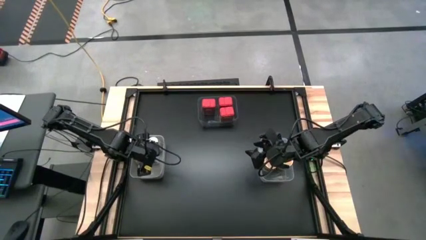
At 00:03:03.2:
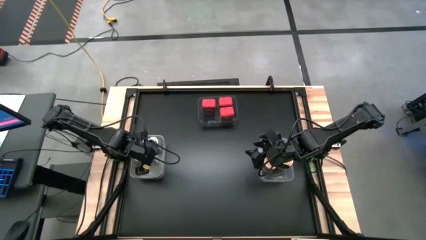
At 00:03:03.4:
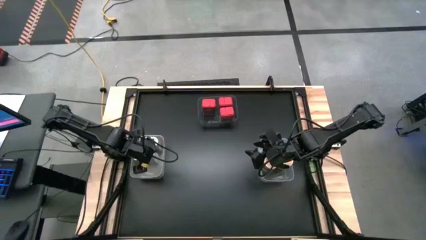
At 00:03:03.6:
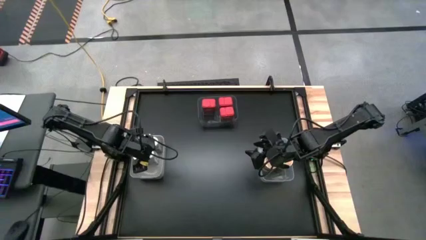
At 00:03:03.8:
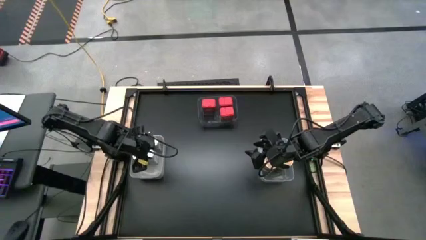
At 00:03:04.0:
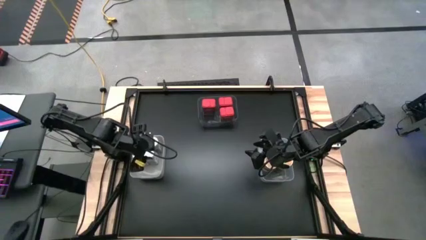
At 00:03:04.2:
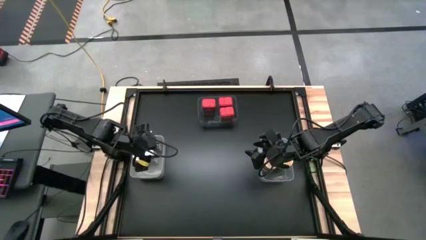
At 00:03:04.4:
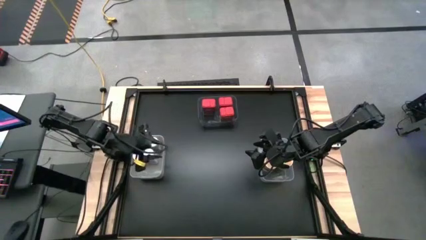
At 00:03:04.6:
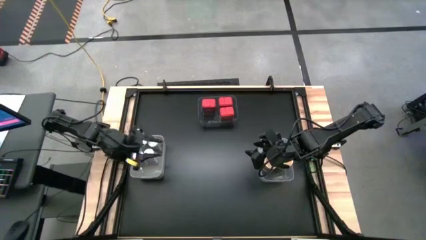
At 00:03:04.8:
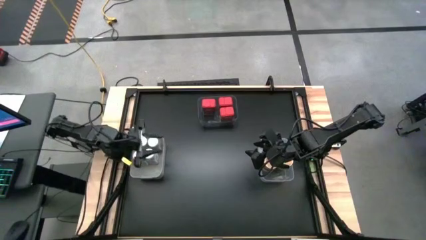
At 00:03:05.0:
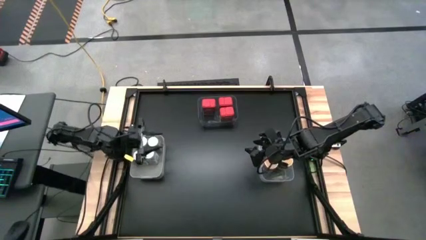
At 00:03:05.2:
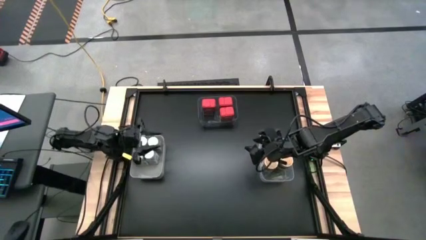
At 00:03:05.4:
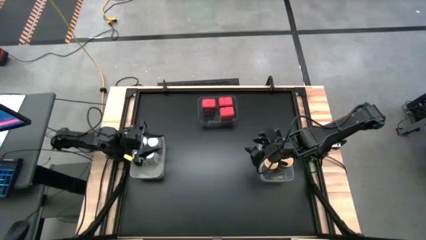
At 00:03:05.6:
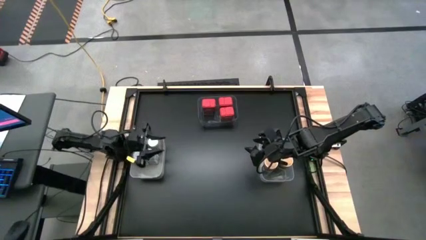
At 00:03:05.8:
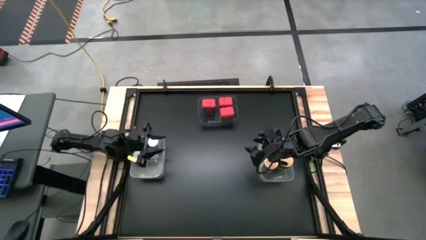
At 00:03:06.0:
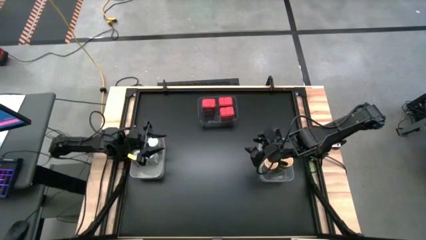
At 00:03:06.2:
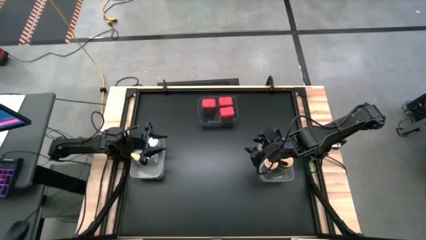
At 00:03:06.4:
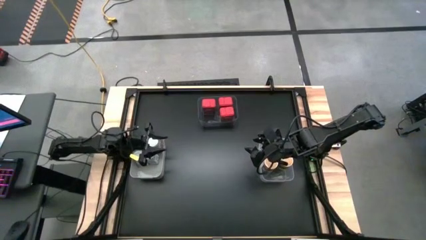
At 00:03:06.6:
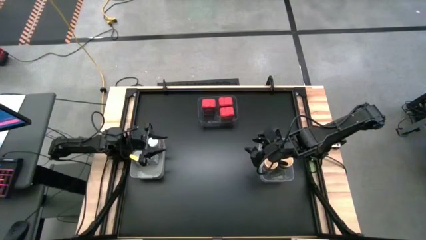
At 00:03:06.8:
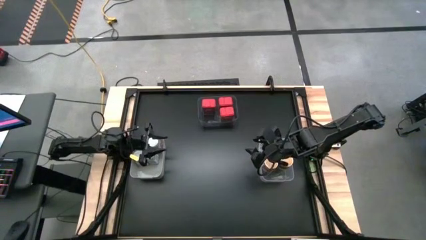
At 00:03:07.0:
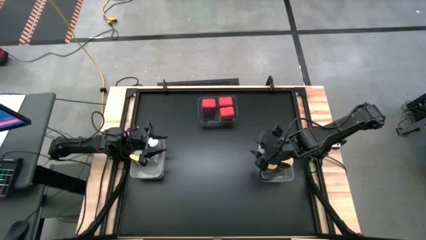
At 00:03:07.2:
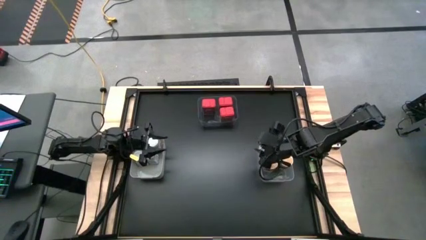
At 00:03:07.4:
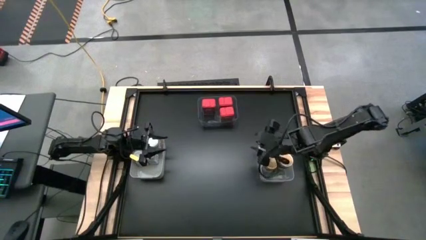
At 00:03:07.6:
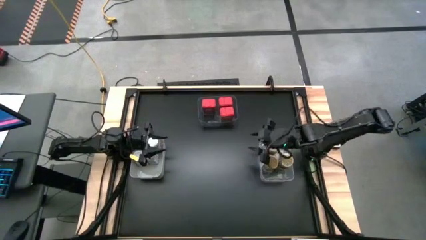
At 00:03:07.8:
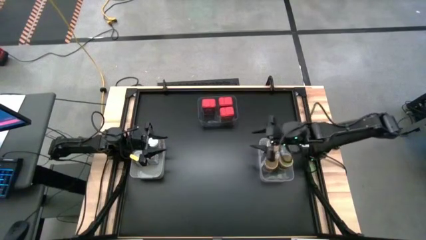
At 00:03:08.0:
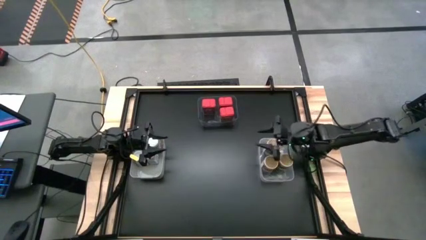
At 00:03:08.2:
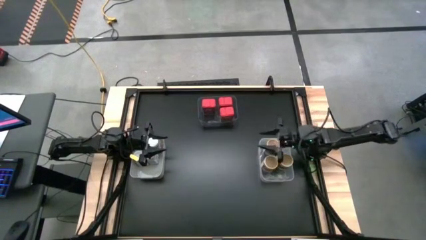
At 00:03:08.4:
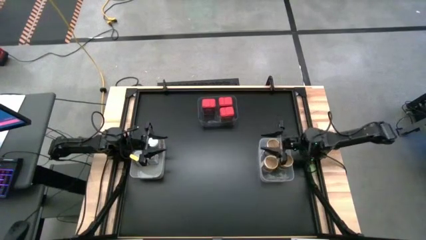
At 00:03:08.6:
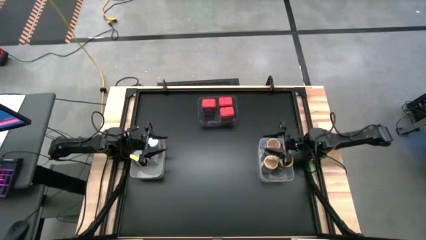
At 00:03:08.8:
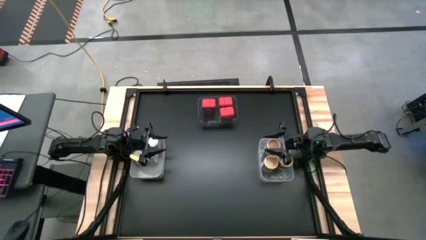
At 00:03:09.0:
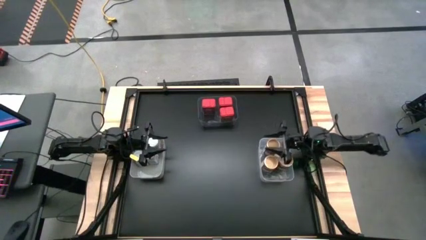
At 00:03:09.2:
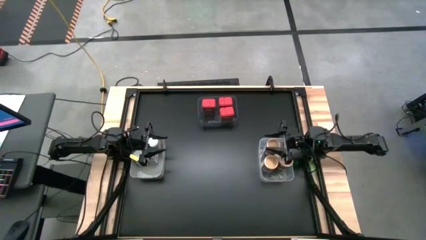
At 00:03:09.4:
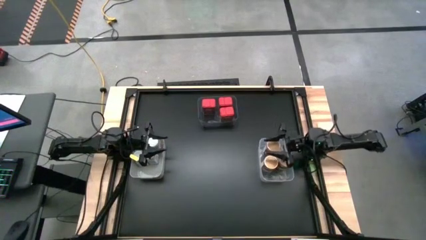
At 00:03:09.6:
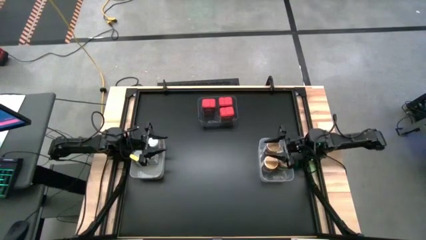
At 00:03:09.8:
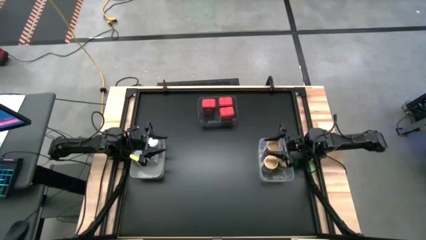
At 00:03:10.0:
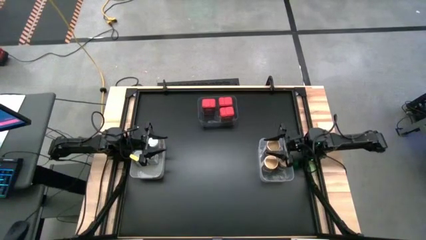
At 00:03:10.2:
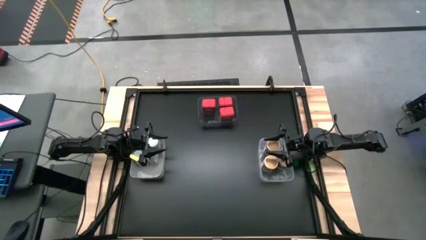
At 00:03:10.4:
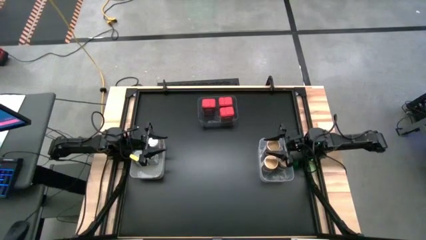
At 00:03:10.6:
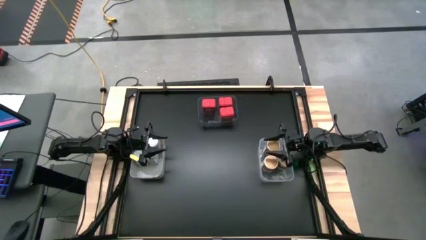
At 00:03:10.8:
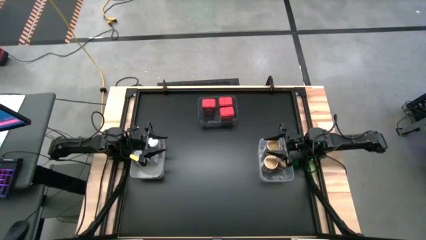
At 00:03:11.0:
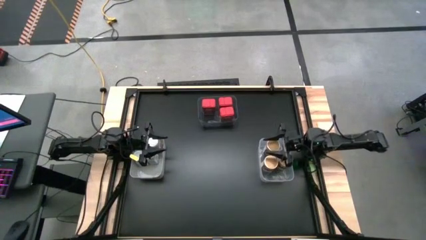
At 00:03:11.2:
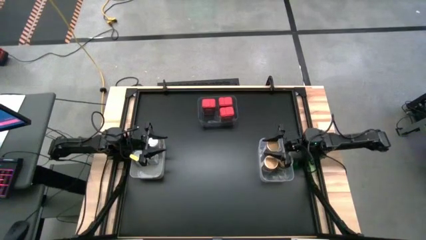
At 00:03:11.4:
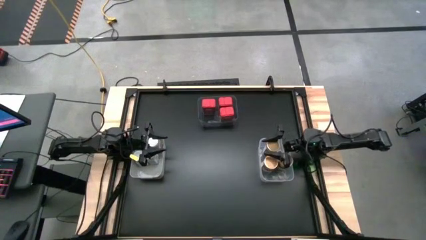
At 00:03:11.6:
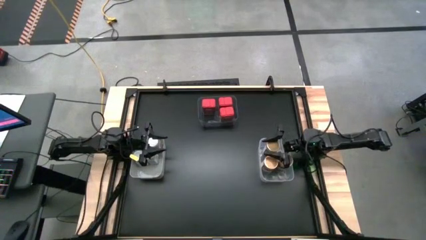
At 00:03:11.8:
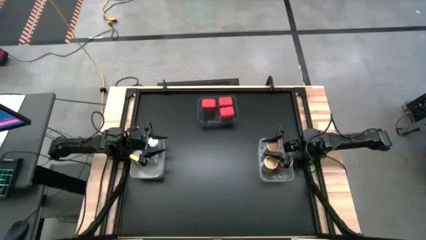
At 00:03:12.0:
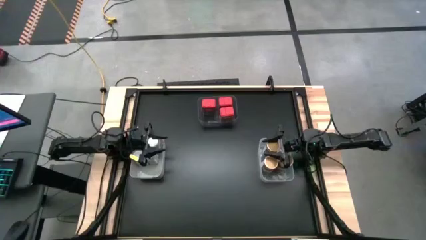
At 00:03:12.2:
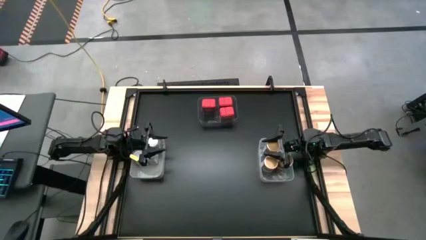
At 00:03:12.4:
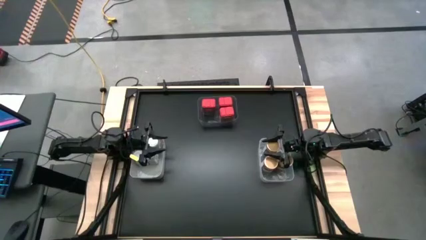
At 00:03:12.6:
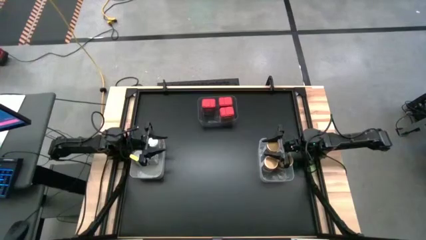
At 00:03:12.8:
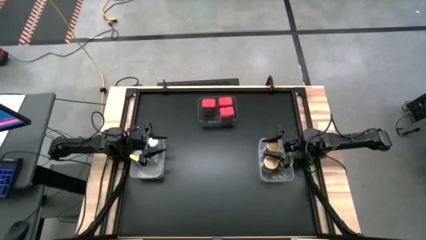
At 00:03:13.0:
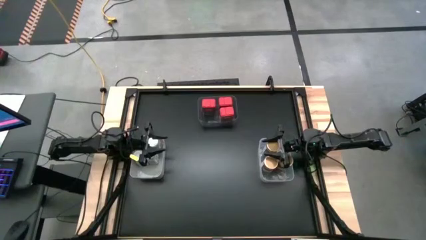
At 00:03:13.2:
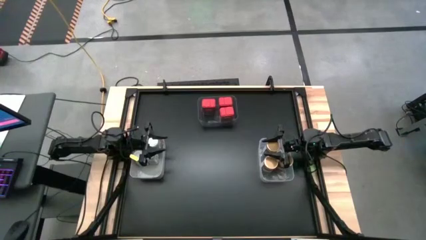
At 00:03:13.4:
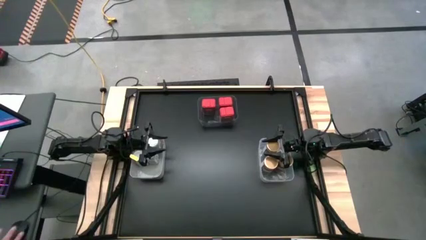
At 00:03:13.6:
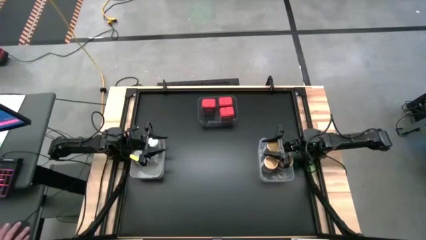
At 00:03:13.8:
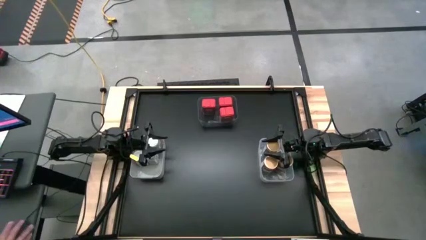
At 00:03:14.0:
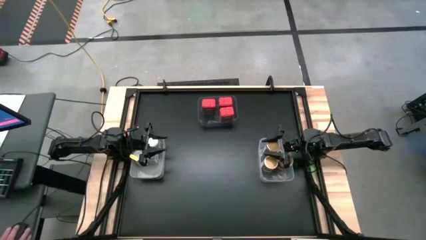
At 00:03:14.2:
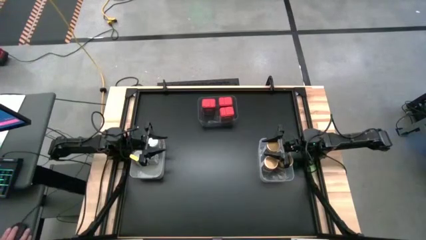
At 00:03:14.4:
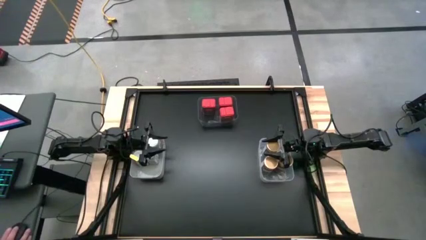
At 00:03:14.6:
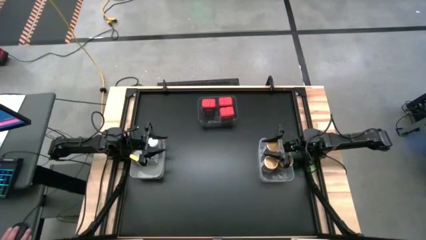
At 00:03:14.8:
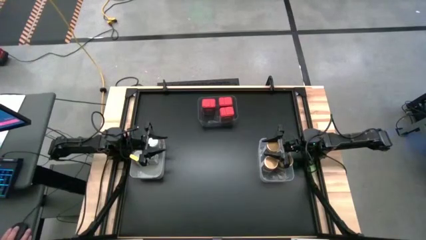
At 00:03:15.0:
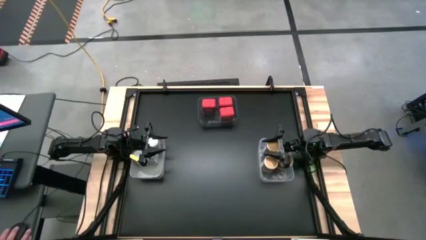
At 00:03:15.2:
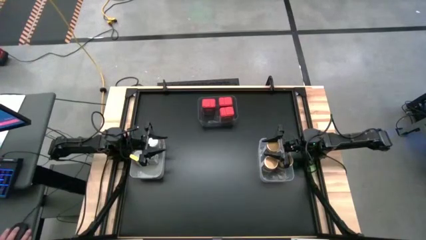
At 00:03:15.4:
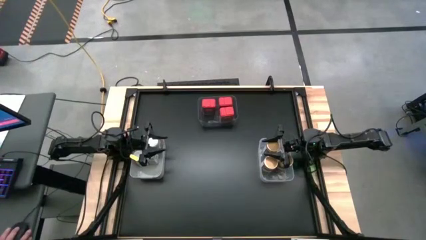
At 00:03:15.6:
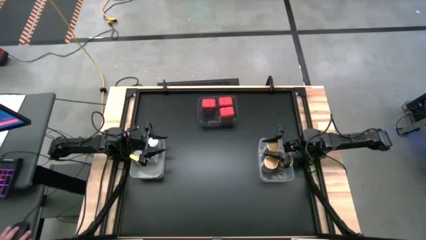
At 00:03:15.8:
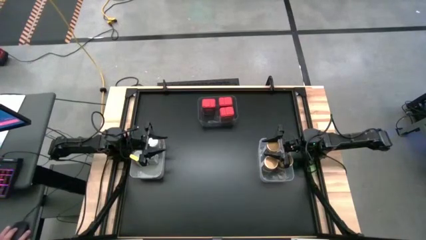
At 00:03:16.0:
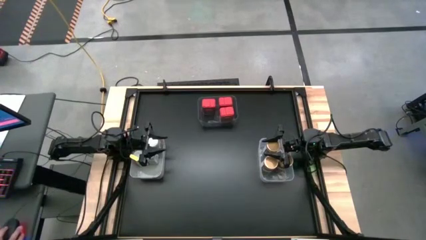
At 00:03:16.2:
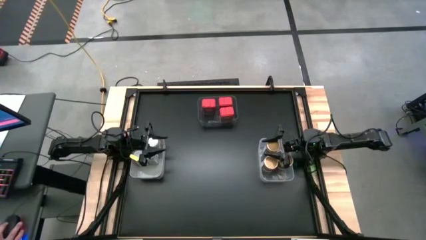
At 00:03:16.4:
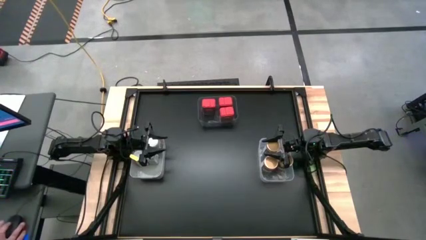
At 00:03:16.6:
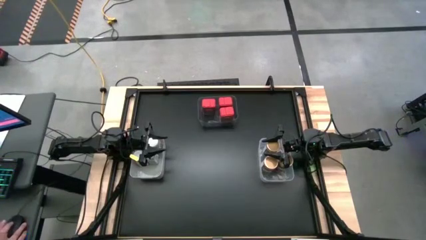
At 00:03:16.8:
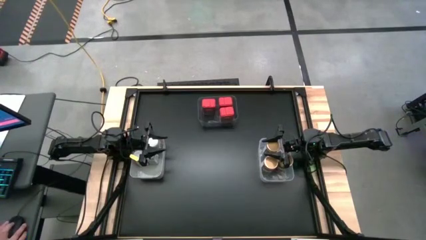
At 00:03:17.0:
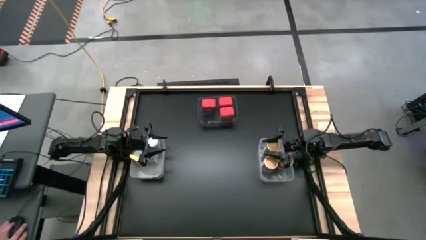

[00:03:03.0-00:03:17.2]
Task: Sort spices by type
Return to Home Position
